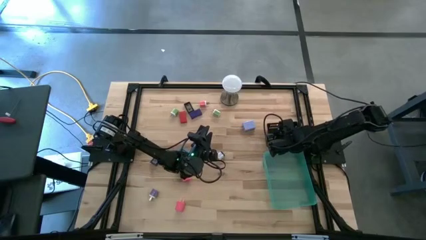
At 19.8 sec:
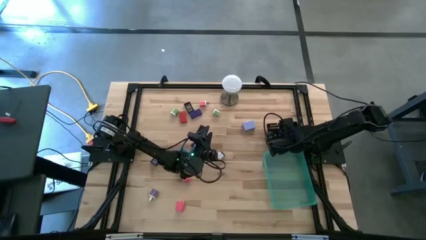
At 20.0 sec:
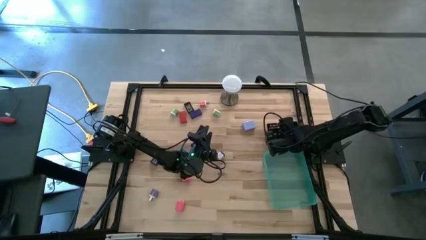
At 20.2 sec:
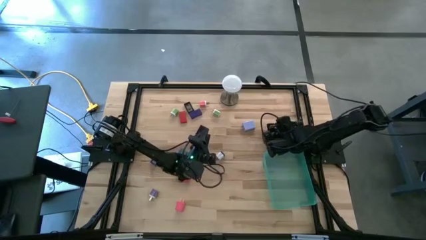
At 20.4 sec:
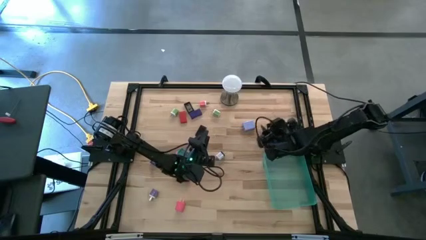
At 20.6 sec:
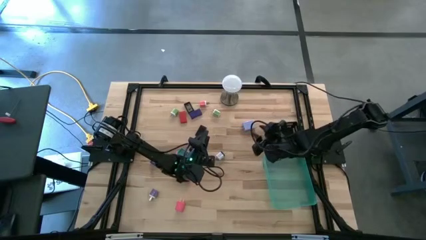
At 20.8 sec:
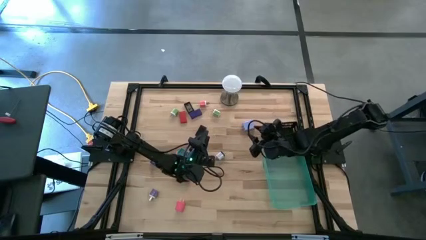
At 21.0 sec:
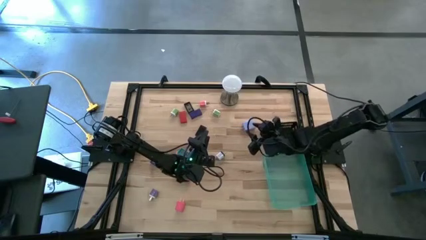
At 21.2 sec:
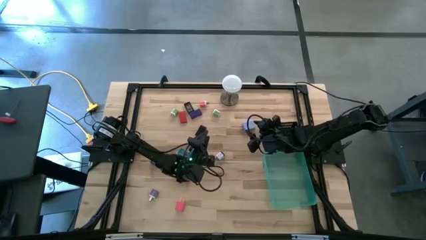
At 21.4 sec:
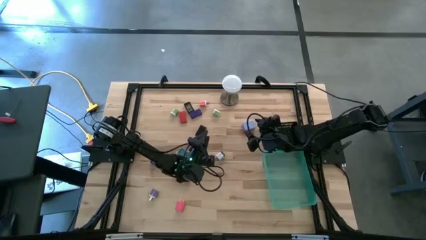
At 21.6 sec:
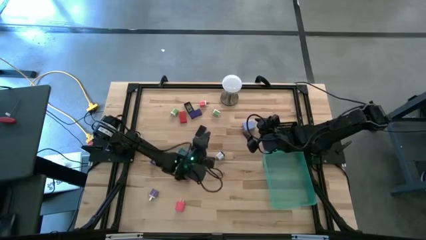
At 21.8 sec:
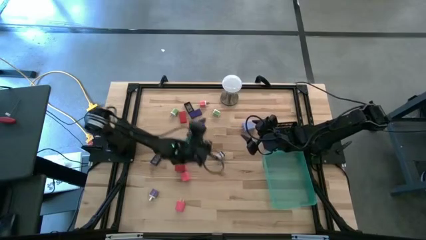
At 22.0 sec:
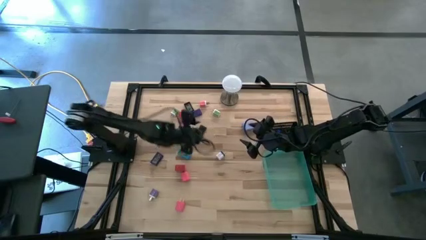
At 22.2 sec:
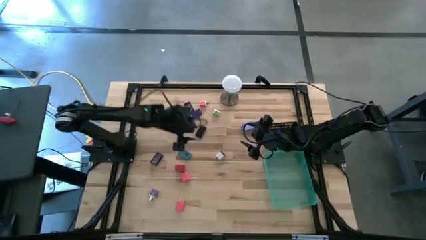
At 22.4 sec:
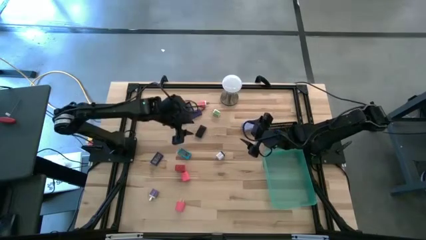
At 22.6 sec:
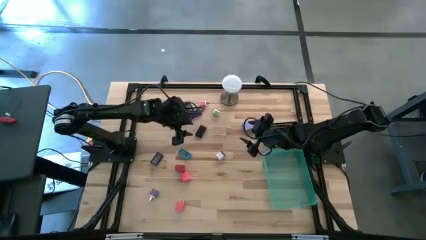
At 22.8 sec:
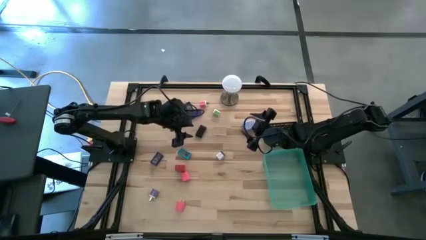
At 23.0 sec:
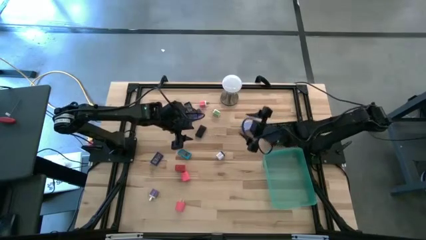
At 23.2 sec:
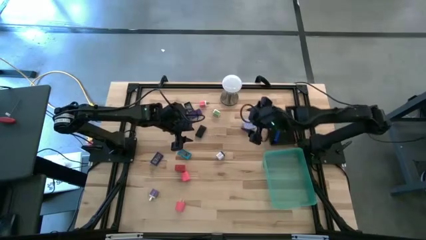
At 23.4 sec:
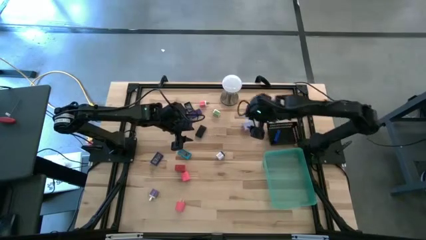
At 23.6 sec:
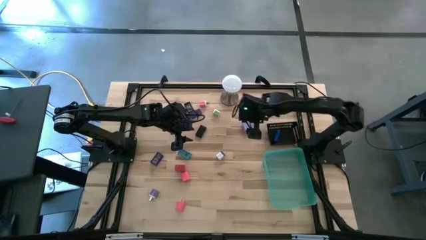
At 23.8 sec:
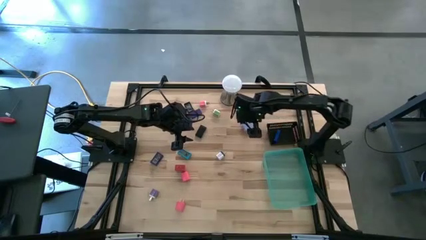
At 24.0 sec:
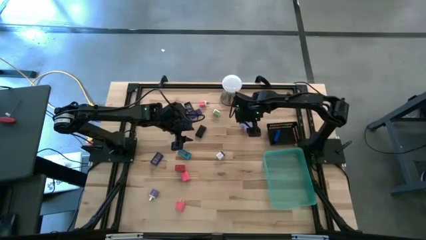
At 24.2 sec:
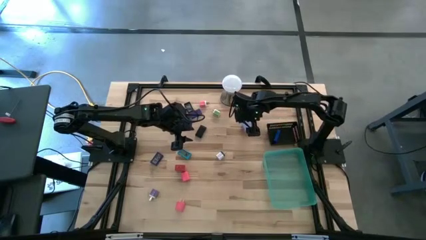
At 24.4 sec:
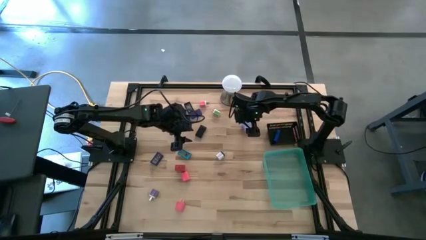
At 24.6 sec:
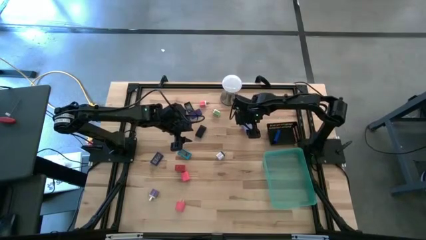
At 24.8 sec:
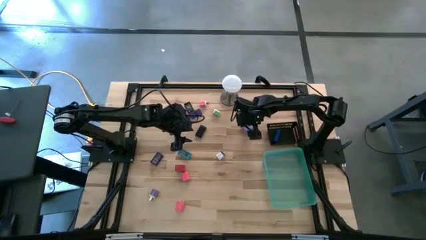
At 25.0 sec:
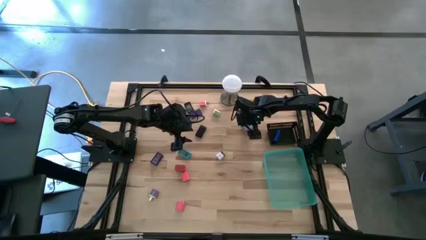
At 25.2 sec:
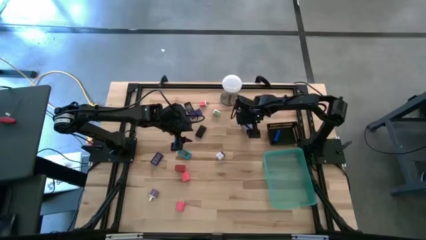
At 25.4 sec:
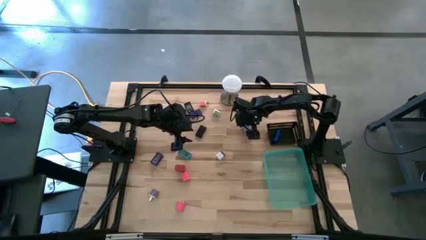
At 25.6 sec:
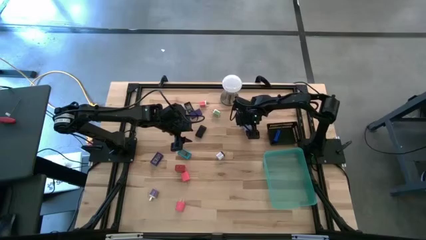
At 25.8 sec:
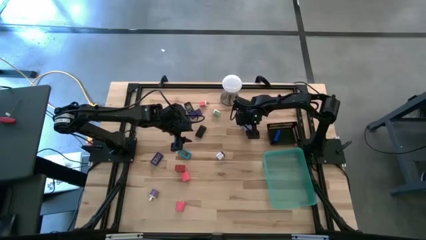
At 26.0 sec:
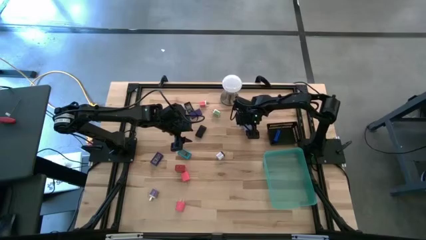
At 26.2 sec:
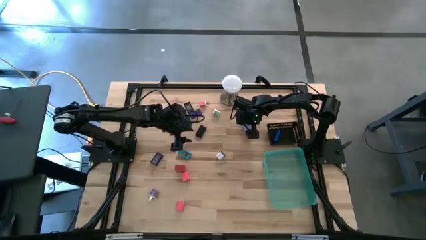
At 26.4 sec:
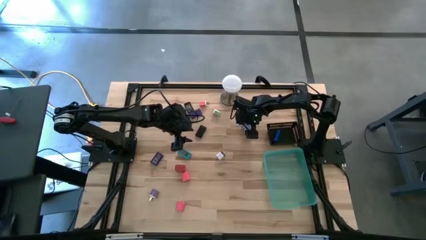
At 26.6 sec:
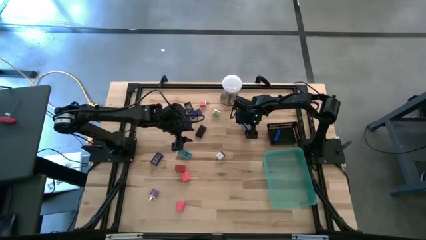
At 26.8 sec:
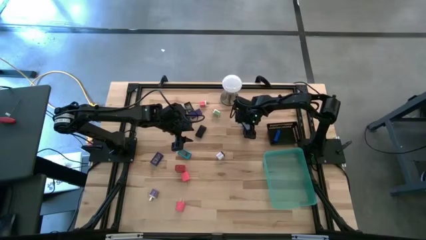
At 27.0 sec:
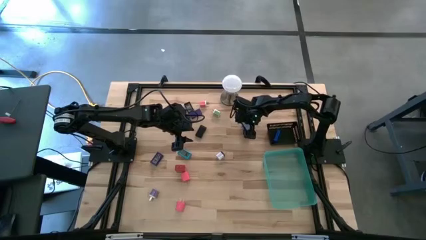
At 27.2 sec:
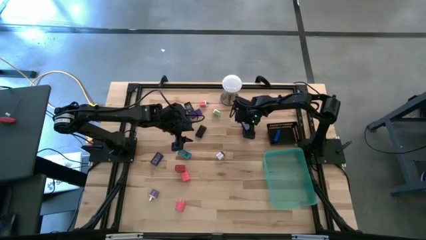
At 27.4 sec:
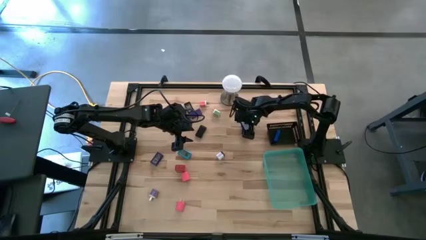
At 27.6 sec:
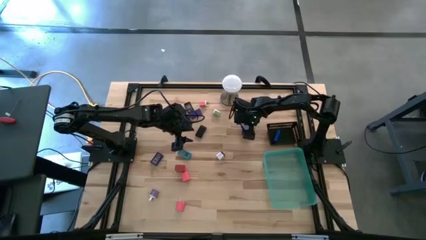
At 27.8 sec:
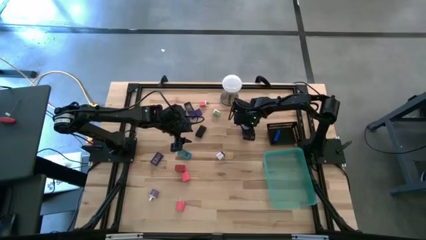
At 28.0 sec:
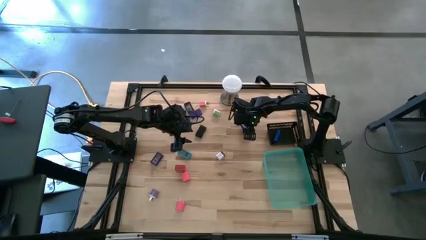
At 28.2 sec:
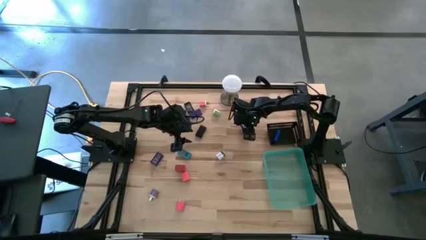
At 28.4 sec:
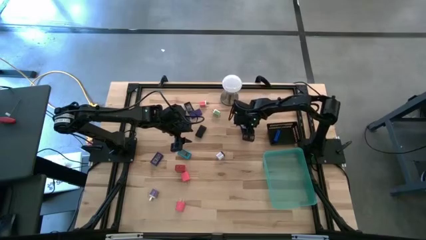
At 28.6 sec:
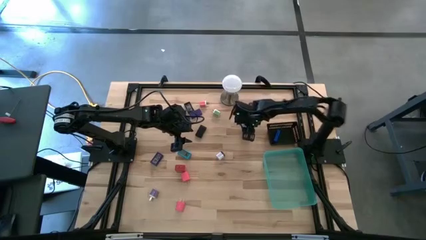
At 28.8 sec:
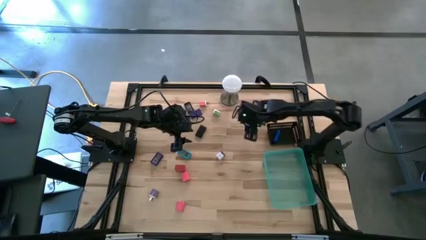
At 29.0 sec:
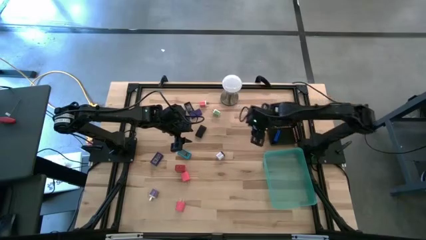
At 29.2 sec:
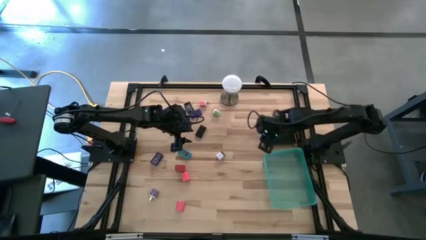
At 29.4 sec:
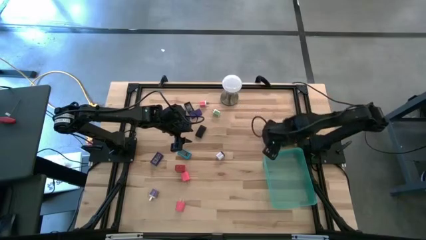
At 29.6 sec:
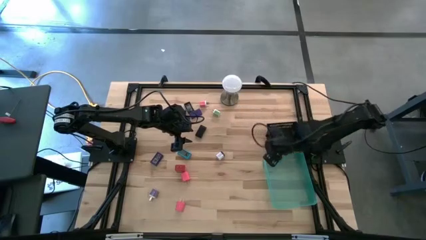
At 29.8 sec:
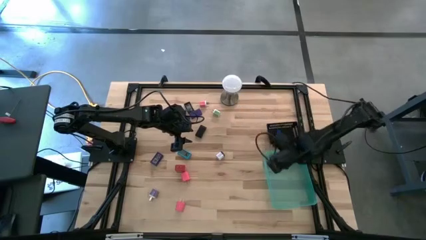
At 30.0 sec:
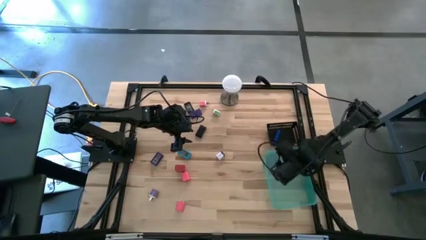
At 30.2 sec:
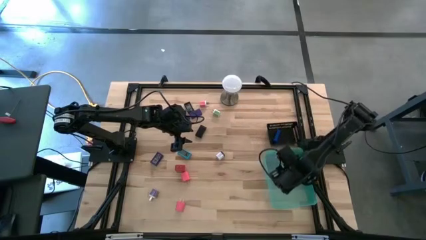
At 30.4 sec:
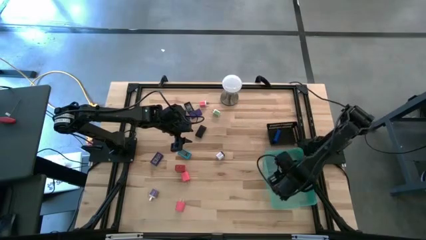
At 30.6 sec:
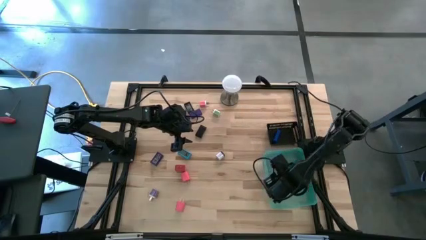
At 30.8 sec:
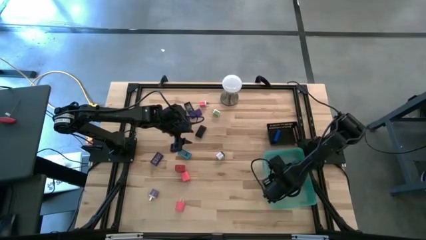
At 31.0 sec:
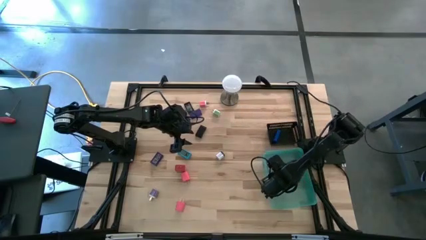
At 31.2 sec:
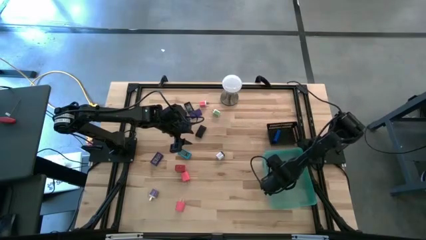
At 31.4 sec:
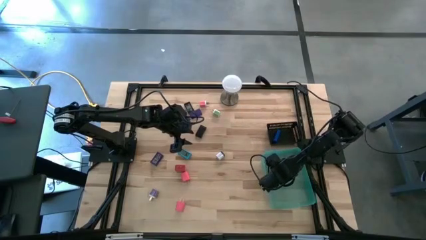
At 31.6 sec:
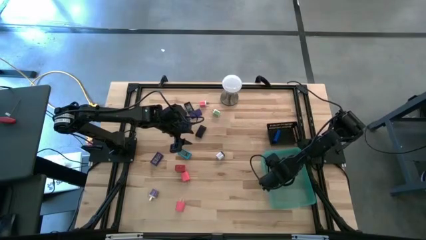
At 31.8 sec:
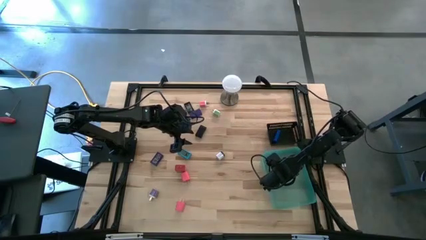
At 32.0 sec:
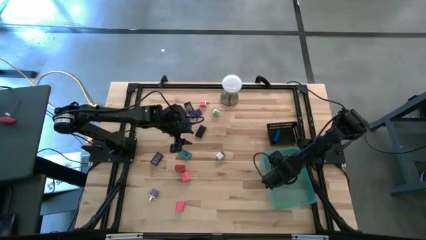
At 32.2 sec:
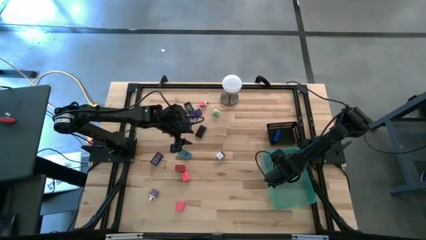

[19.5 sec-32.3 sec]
Task: Pick & Place Office items
Put the purple charger adapter into the green bin

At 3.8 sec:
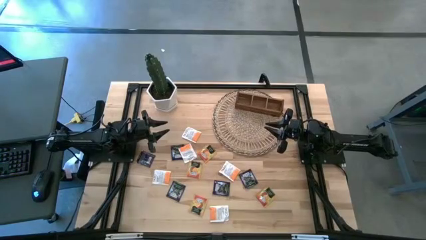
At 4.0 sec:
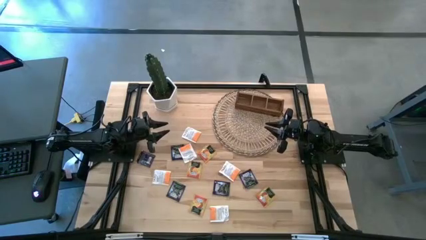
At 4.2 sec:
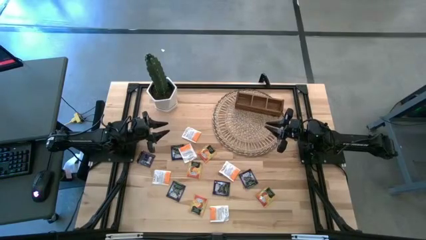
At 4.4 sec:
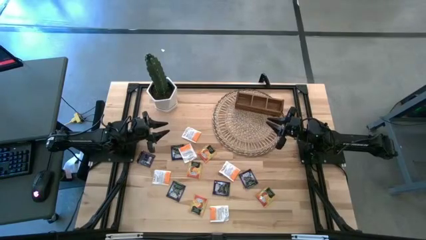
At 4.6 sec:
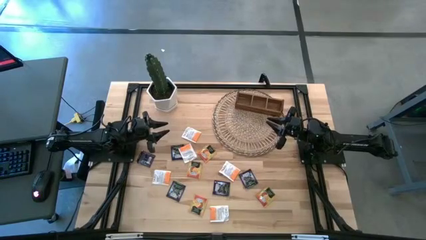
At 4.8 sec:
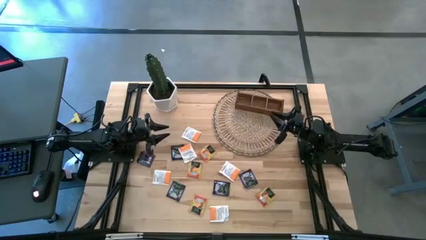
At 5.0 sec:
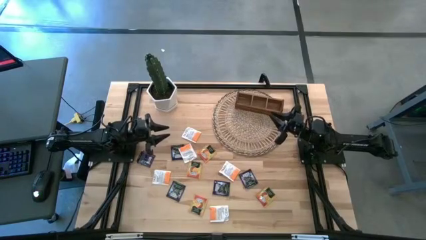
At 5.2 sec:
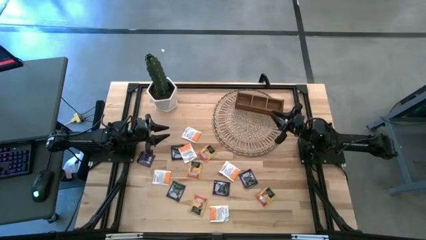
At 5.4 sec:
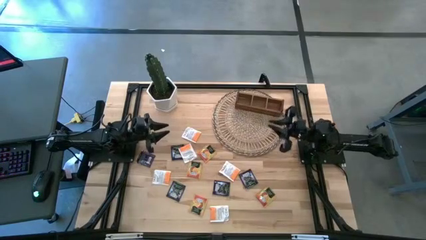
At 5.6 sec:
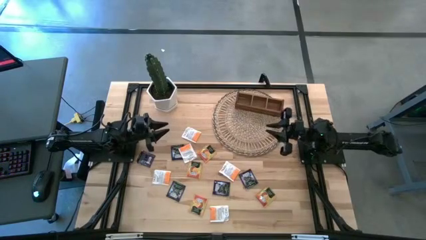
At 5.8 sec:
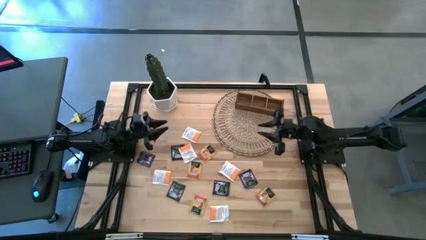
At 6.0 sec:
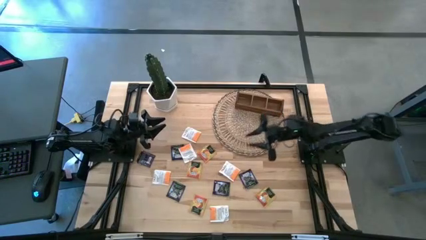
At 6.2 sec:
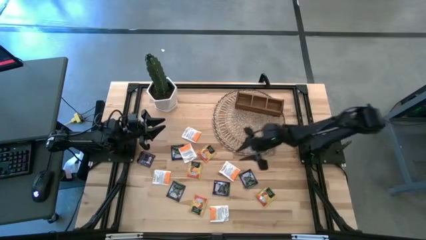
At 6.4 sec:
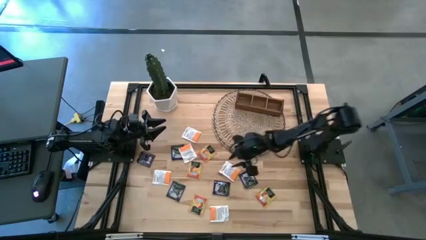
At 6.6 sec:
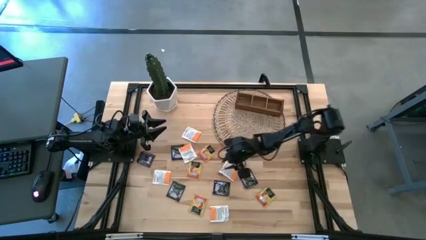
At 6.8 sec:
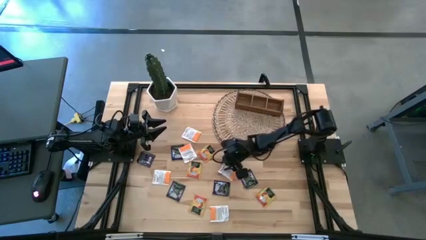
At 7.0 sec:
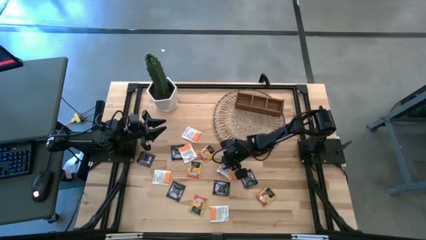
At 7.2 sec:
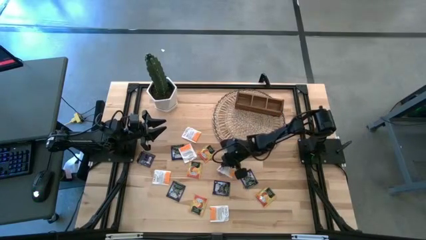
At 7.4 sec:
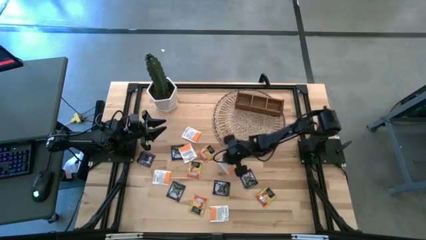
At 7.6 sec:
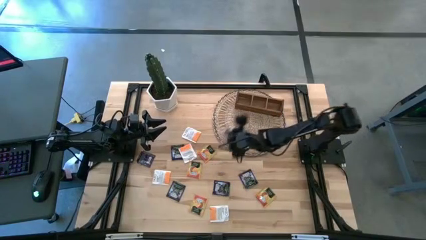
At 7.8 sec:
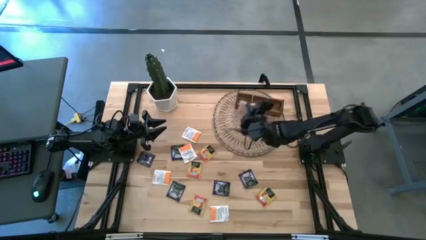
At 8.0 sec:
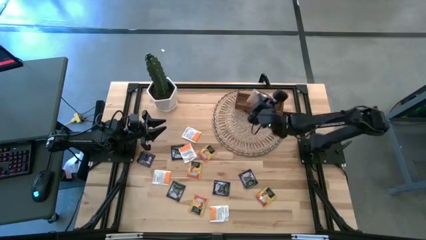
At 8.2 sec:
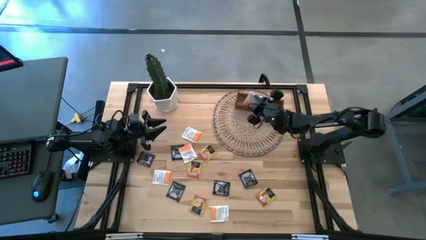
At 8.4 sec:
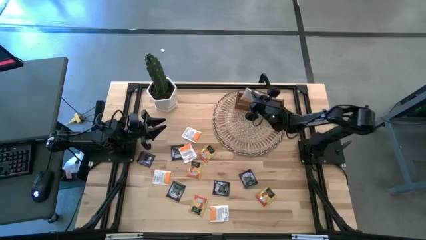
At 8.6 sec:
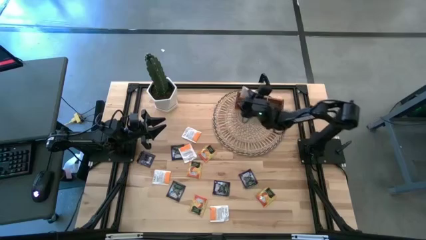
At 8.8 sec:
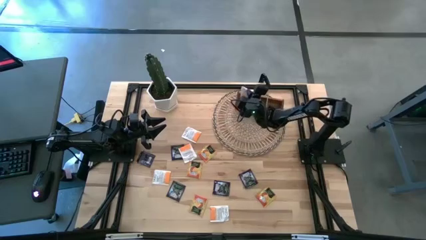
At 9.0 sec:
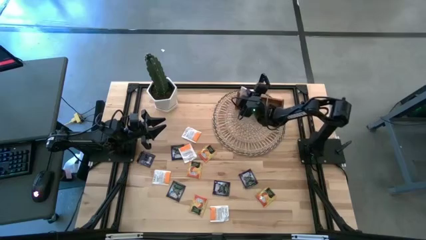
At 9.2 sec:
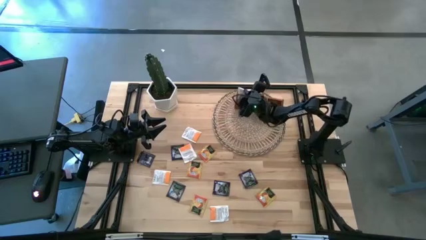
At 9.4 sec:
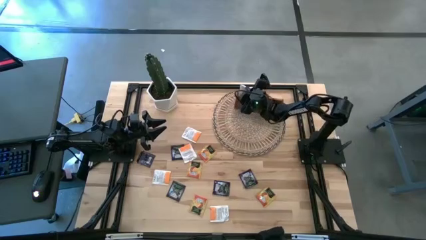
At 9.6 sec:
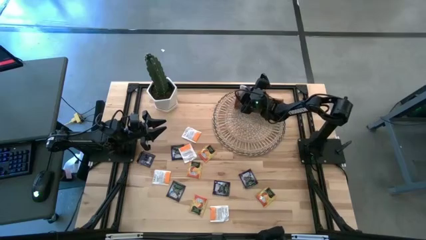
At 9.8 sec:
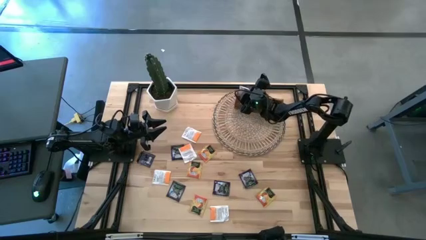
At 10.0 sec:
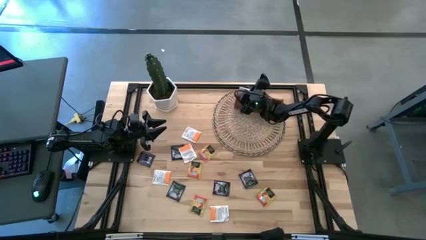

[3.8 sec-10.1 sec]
Task: Pick & Place Tea
Put the orange tea bag into the left section of the wooden organizer
